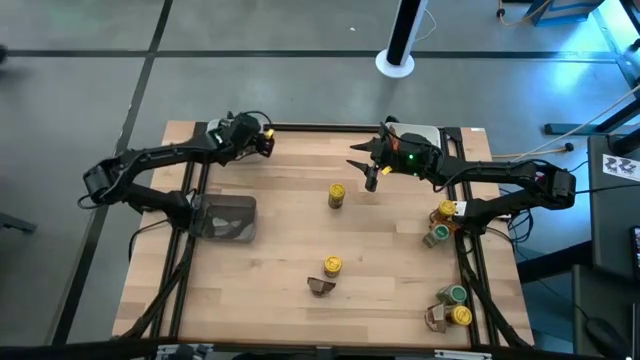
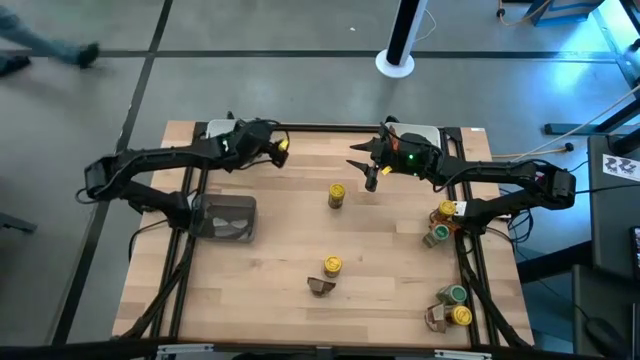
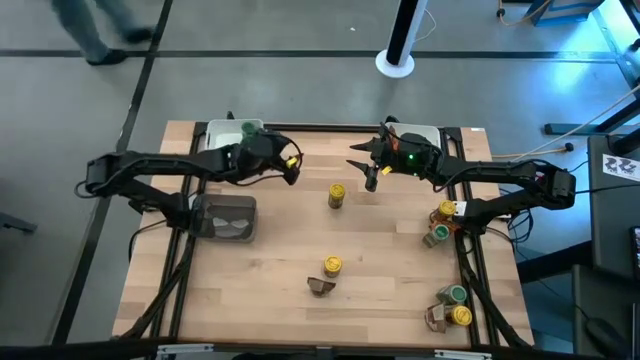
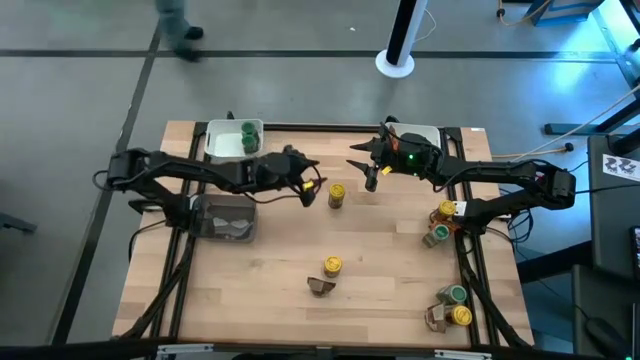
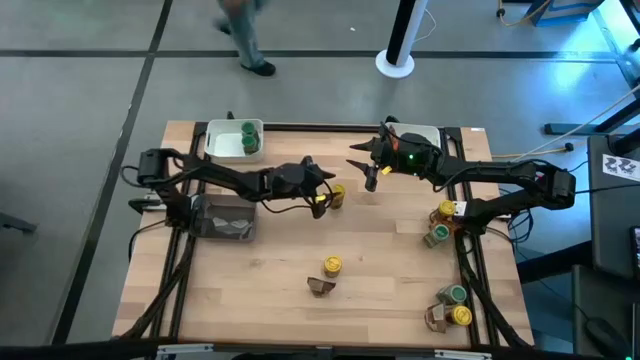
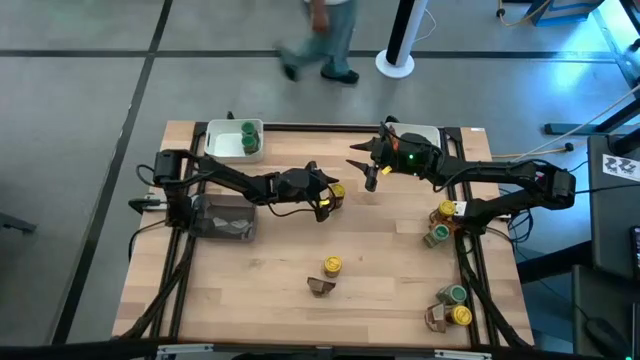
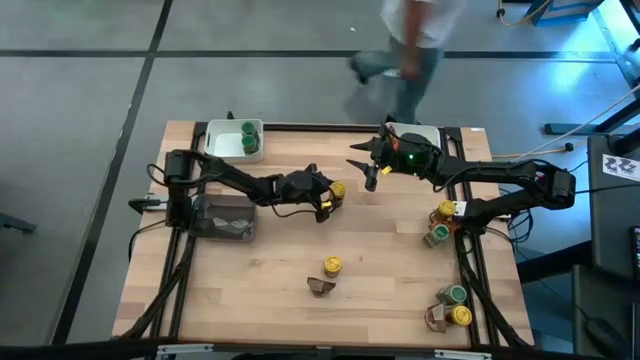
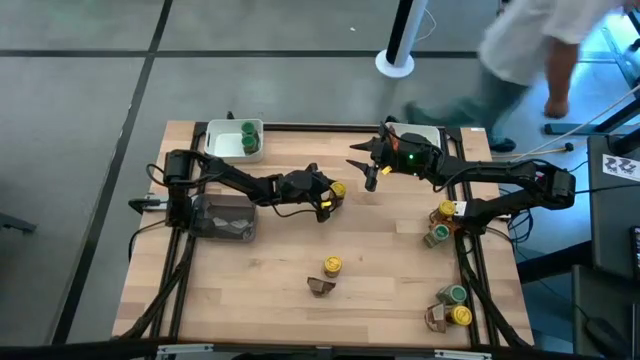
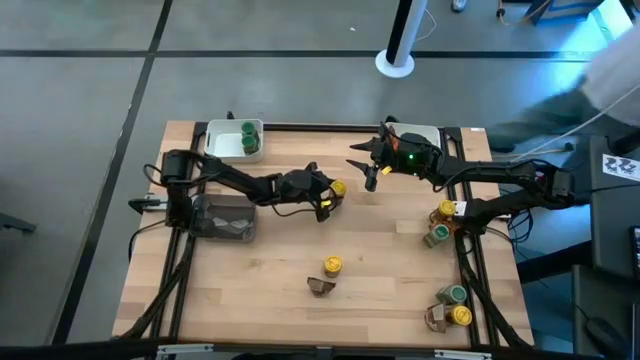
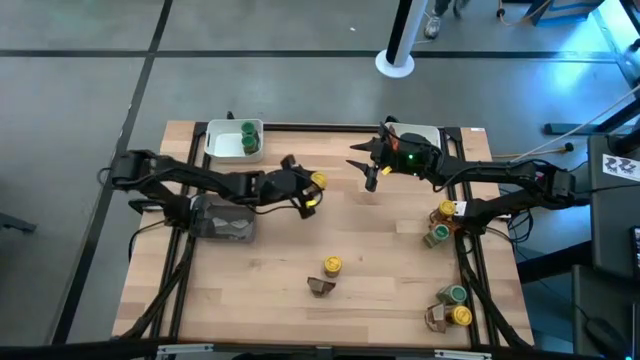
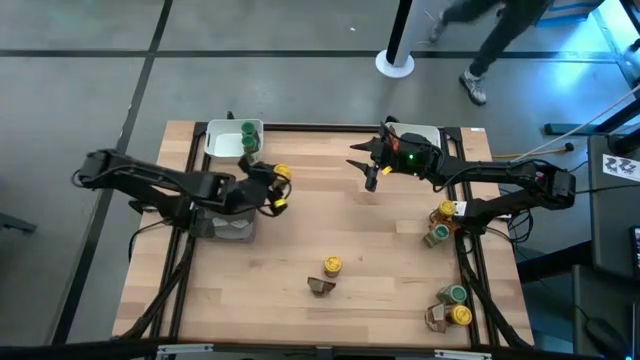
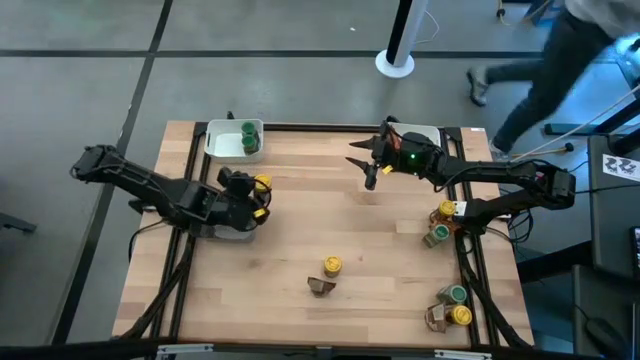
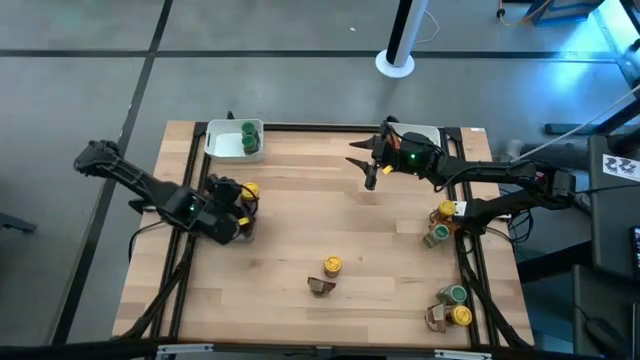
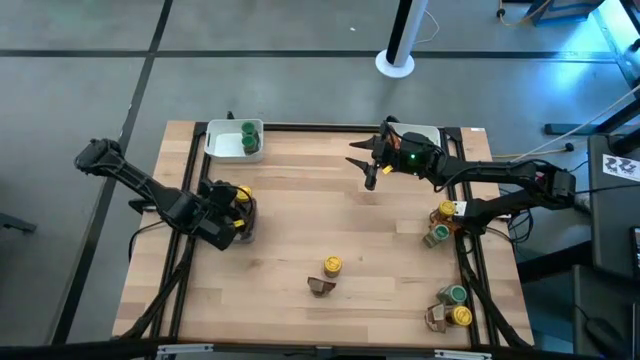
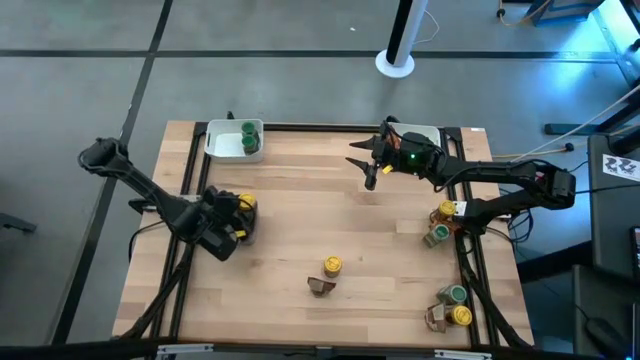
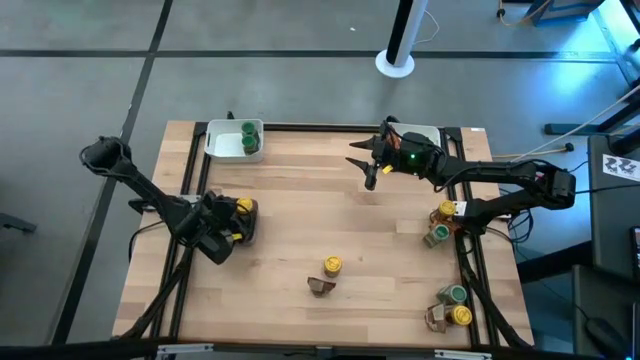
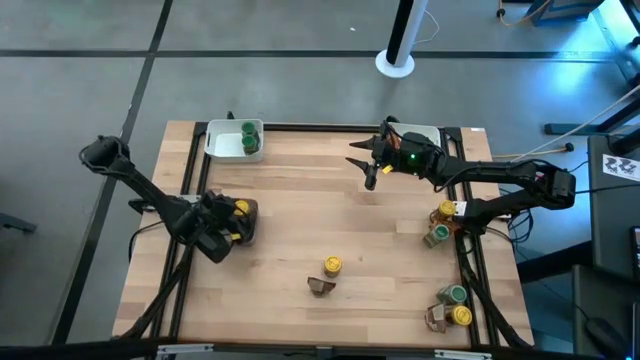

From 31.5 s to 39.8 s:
Task: Sort spices by type
Put the yellow seasoning bottle into the black bin

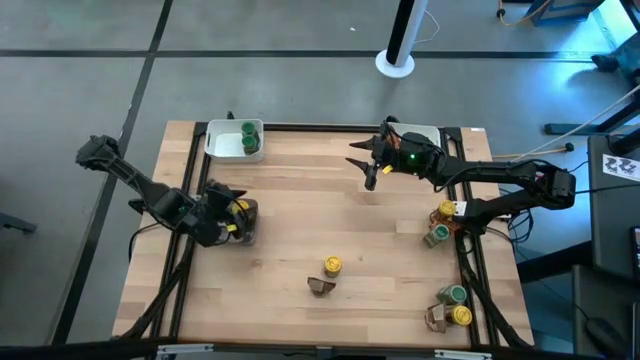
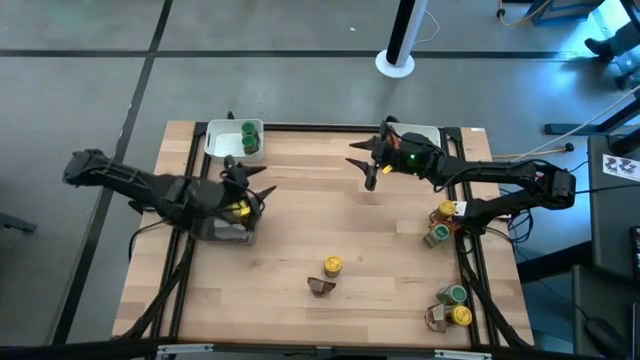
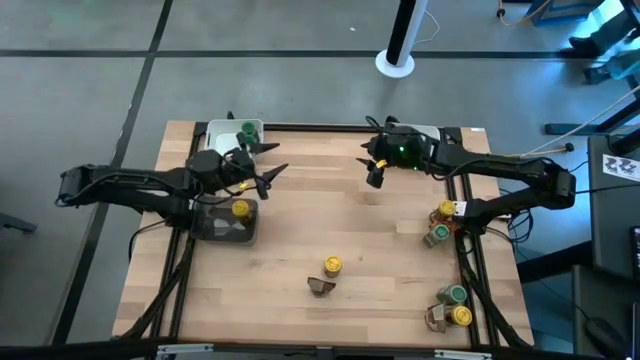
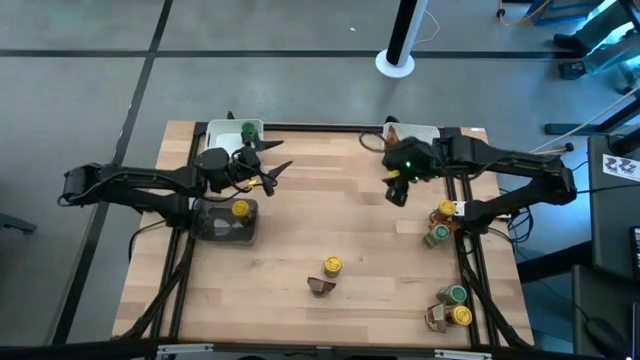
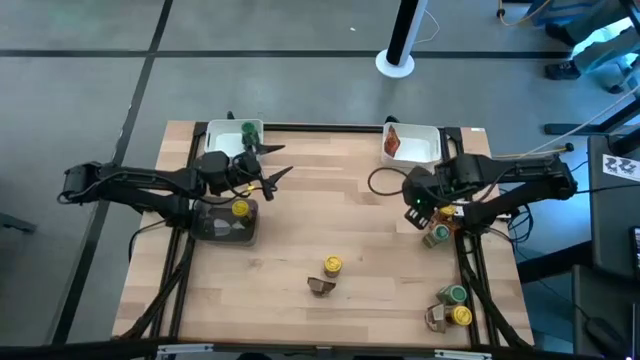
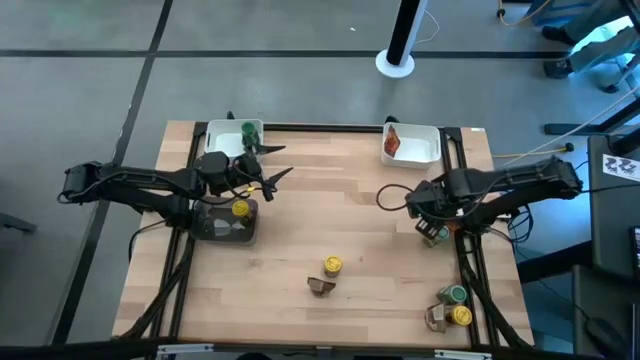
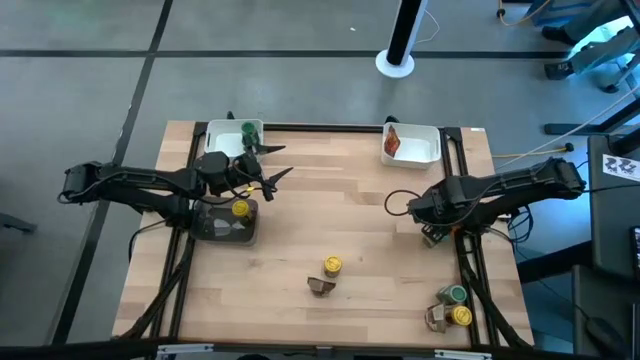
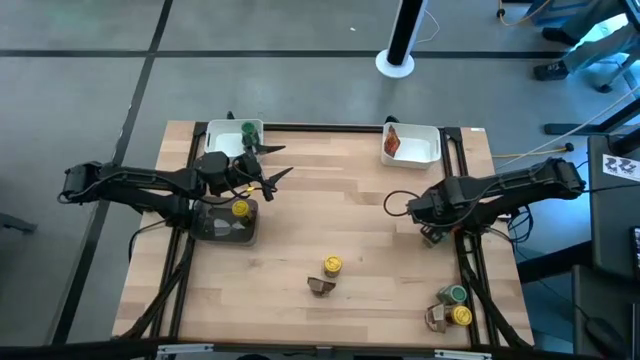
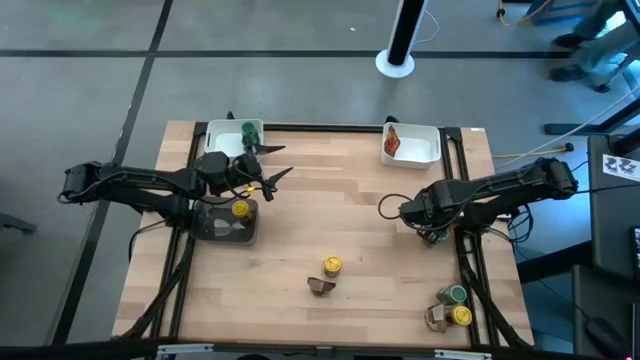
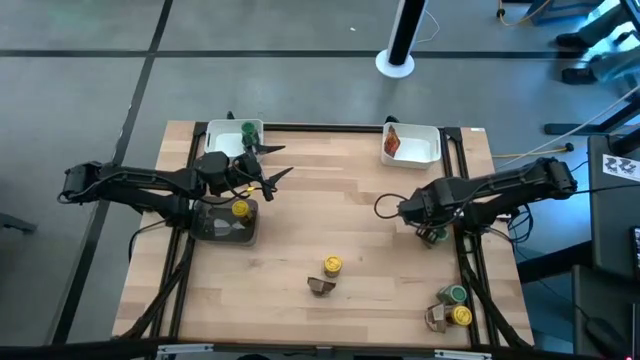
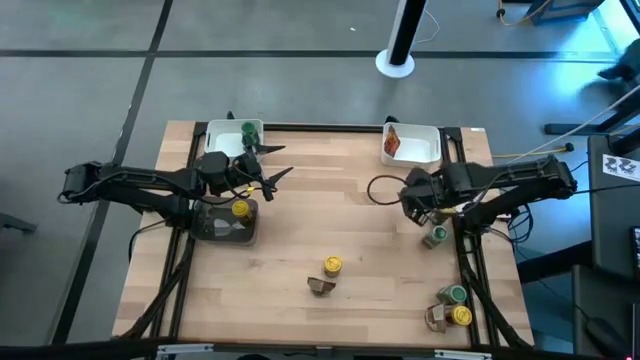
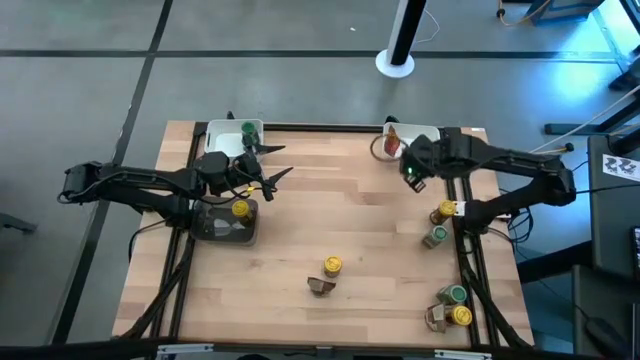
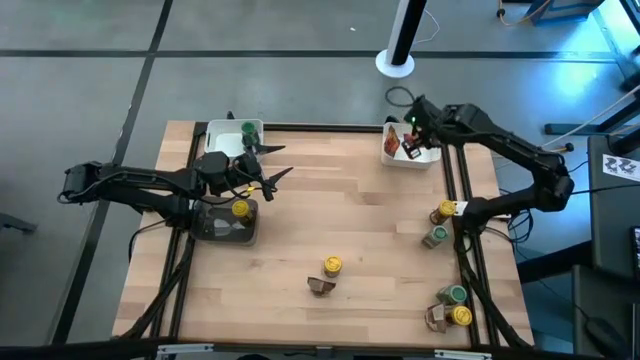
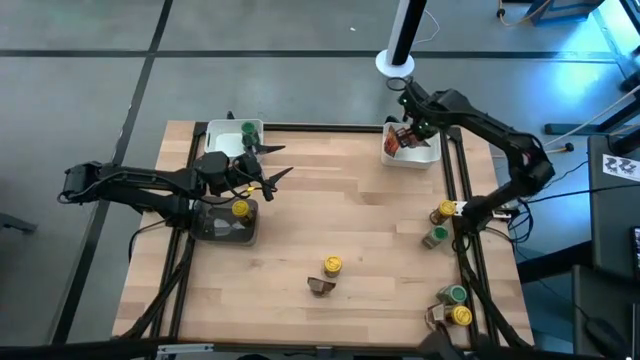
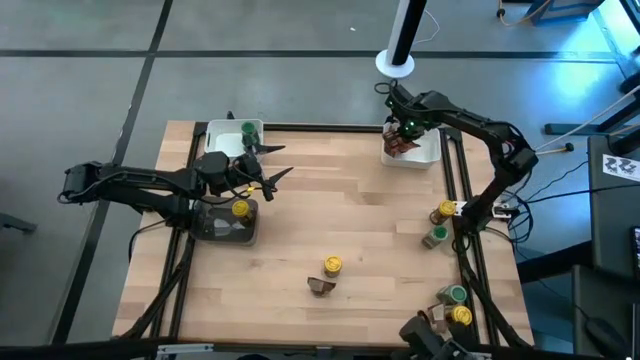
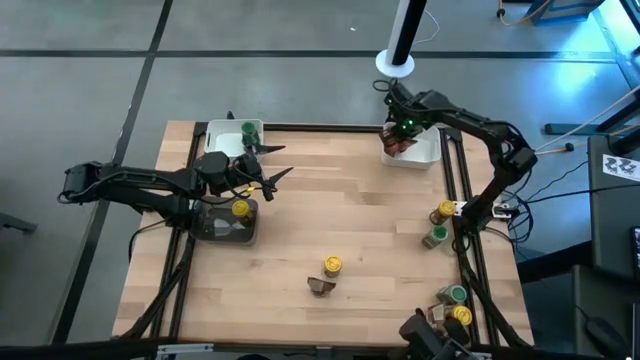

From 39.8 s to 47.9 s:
Put the orange seasoning pack into the top right white bin

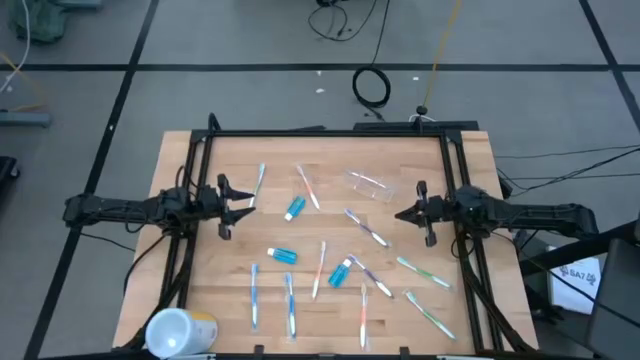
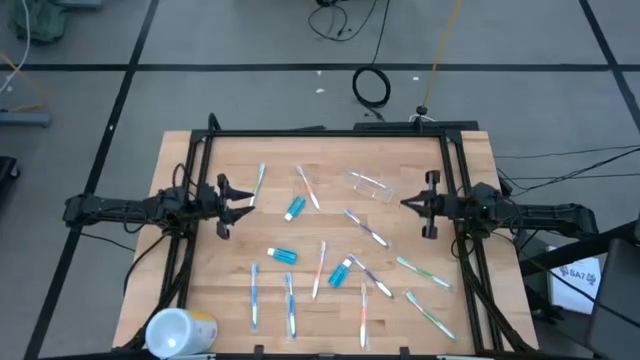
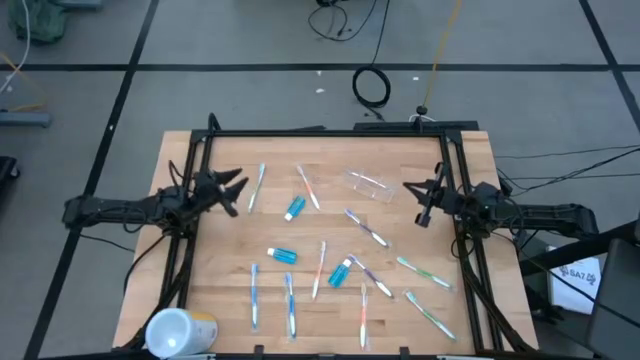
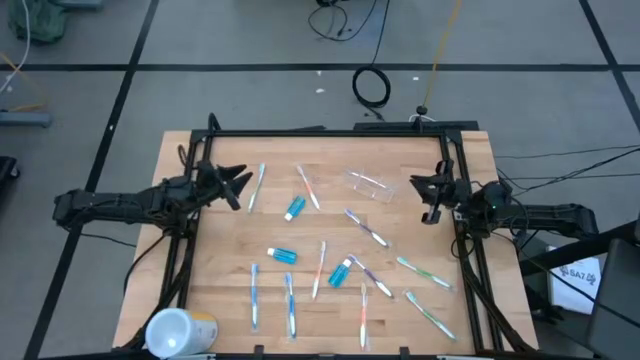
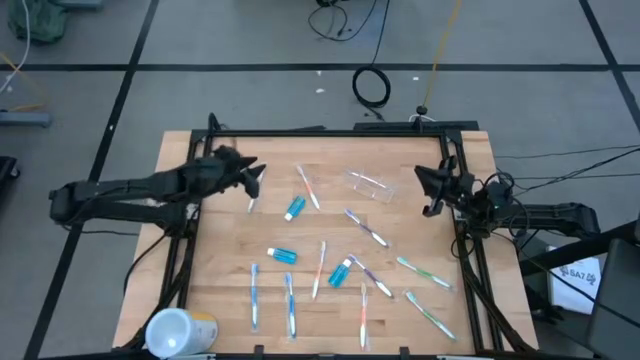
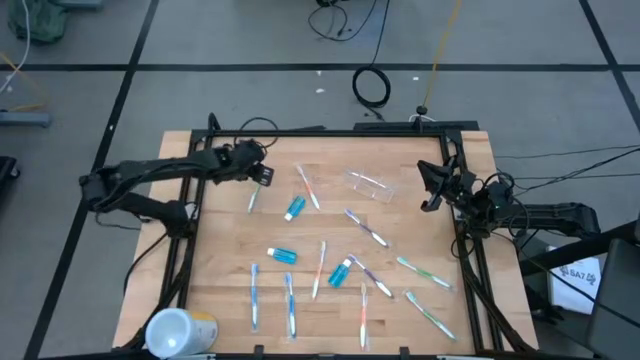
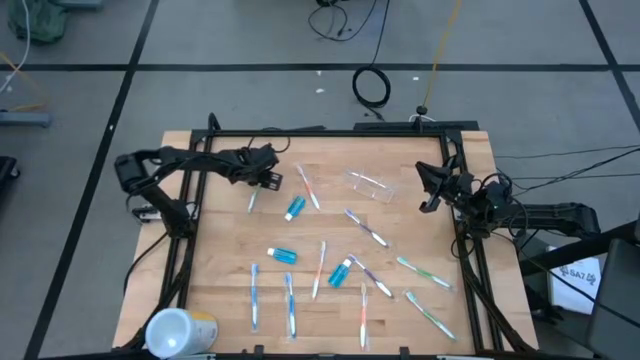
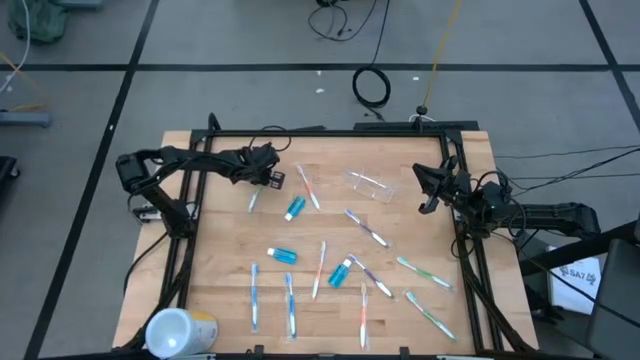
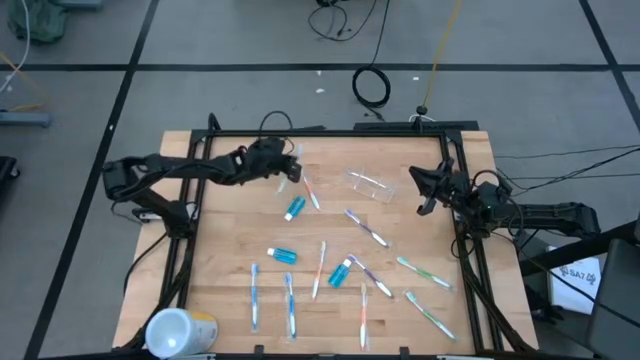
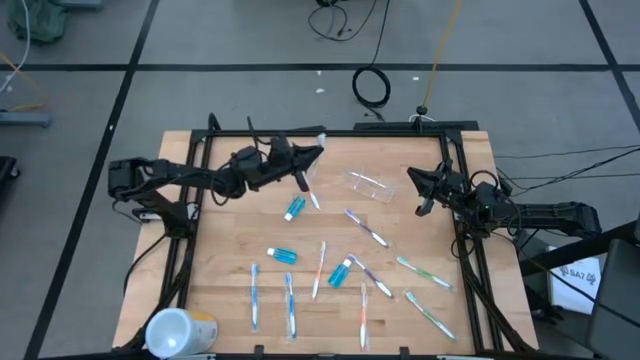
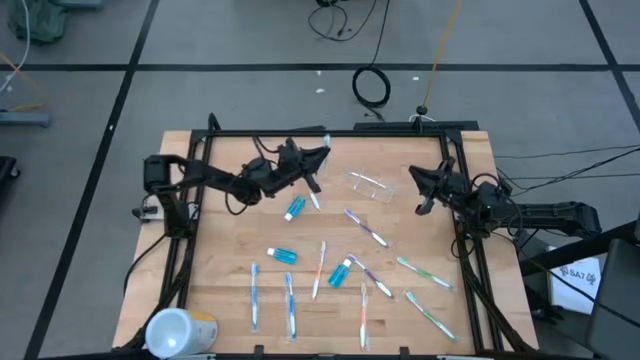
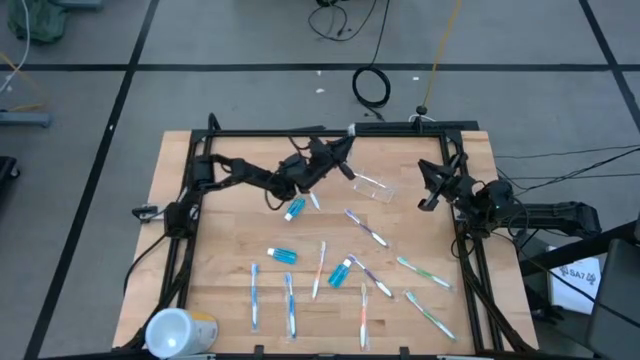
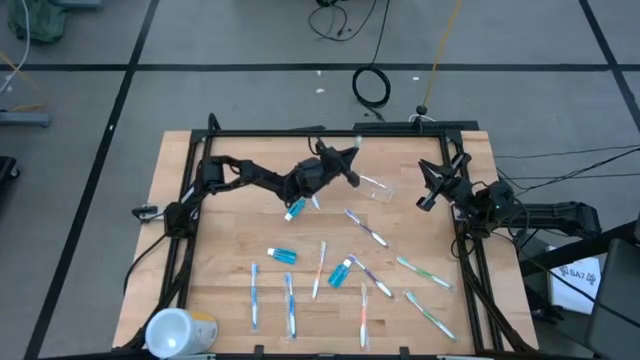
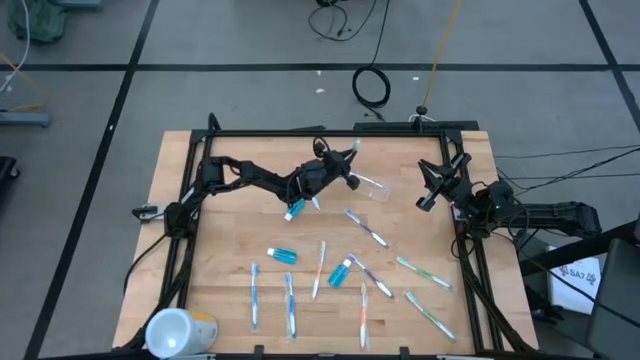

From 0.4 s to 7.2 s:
Task: Pick & Place toothbrushing station
Put the top green toothbrush into the transparent organizer
